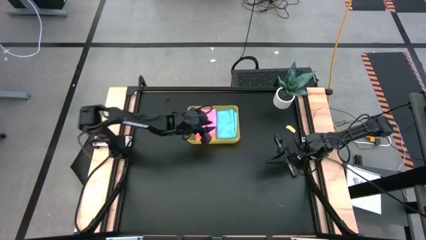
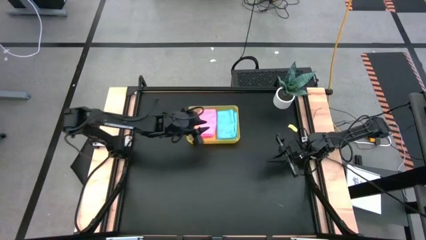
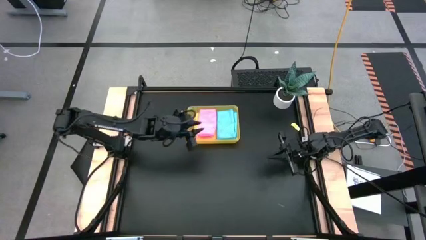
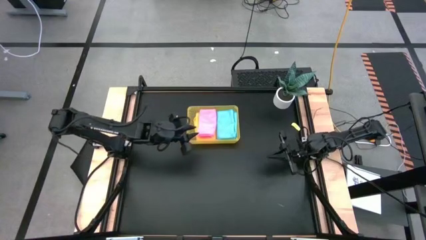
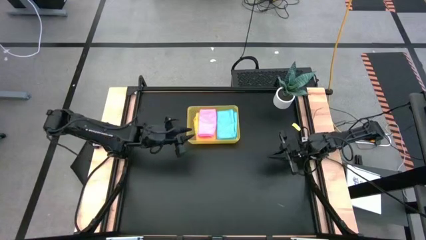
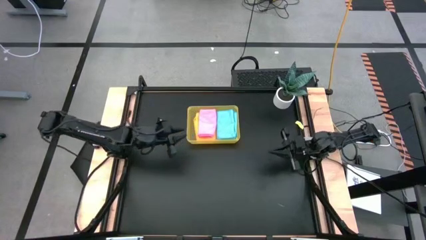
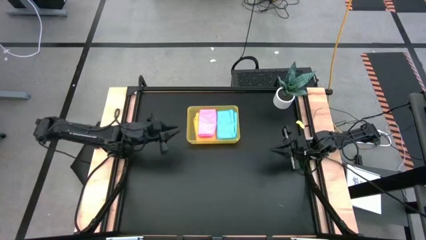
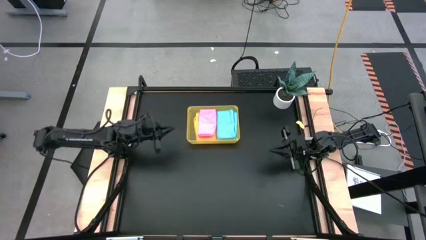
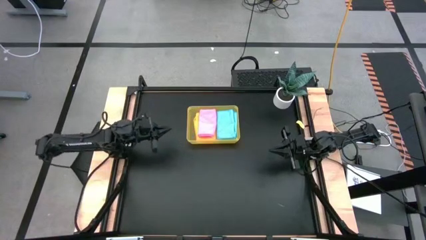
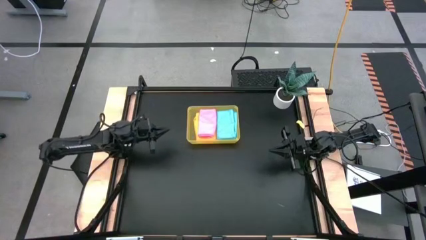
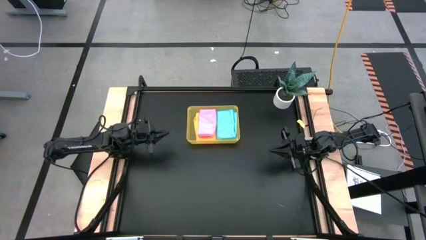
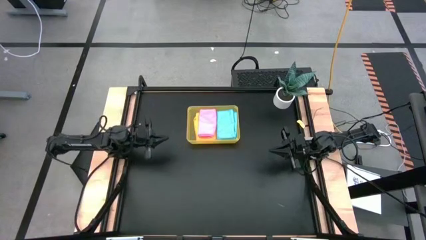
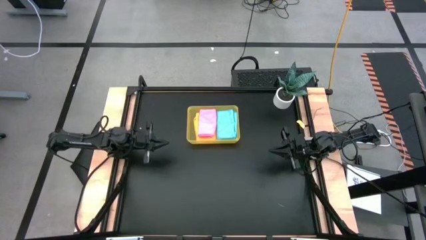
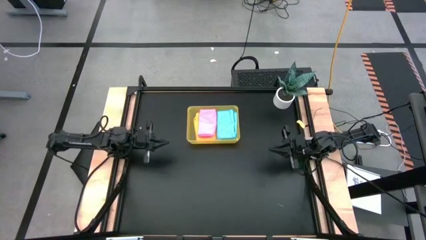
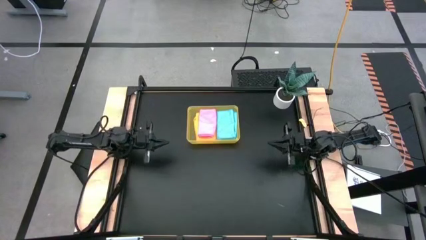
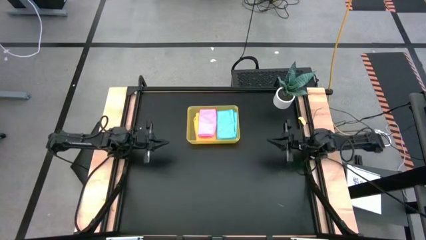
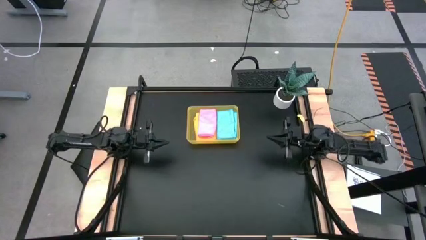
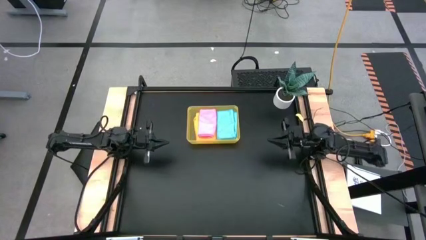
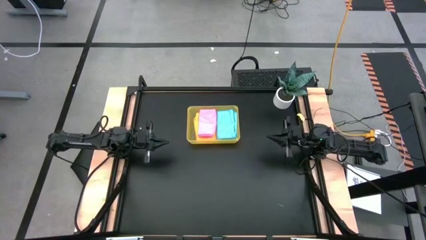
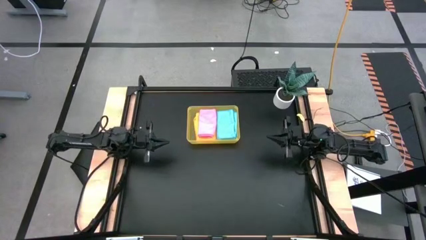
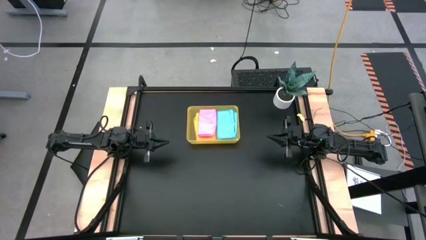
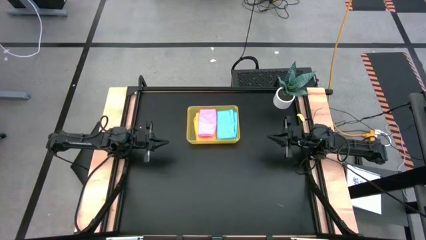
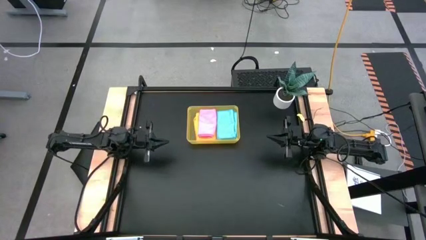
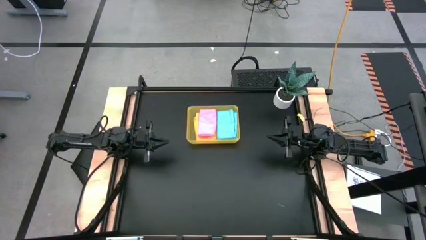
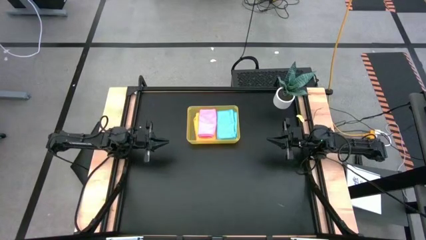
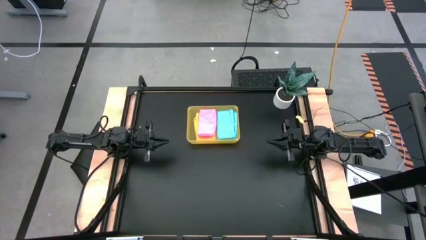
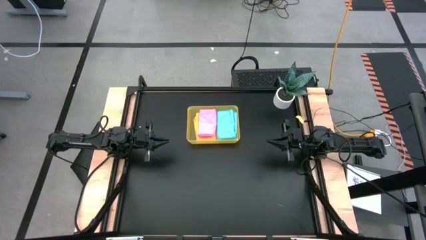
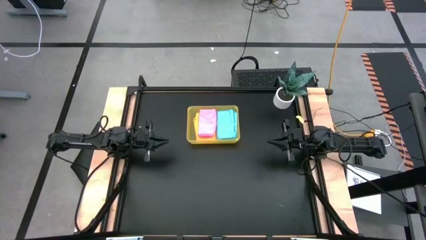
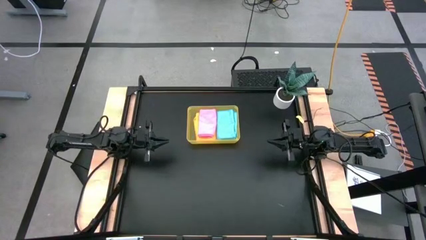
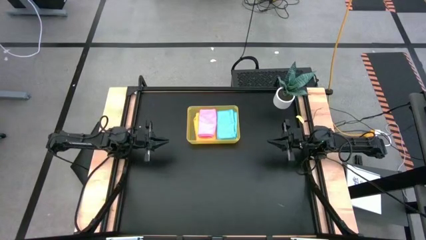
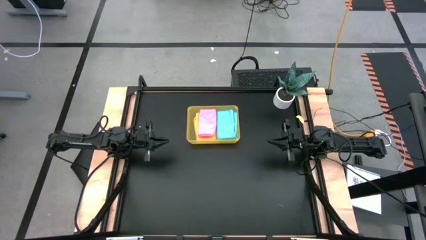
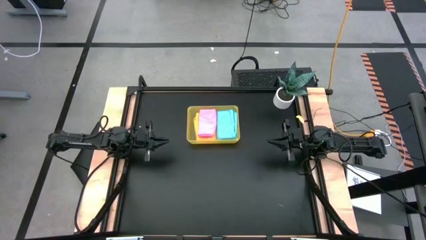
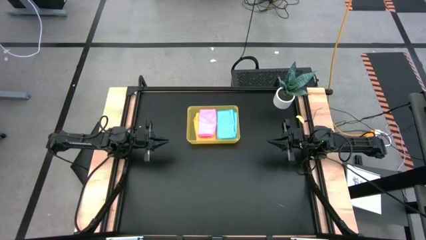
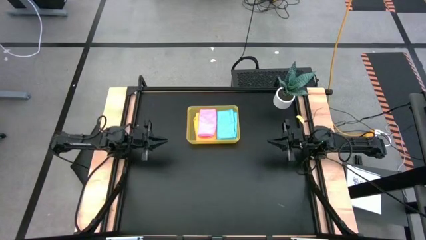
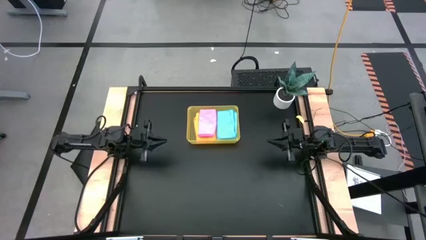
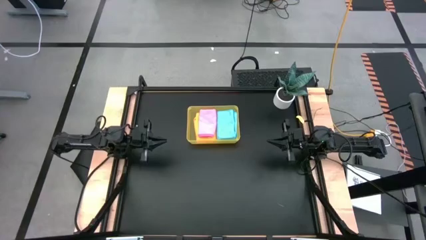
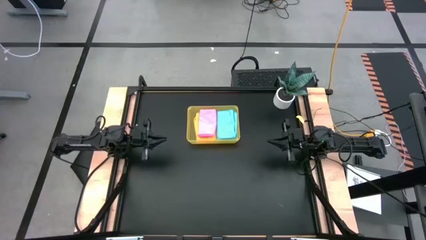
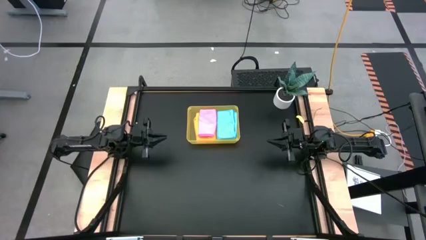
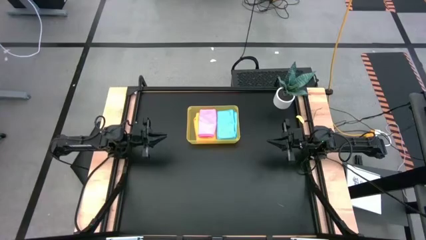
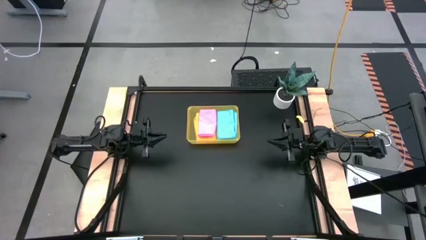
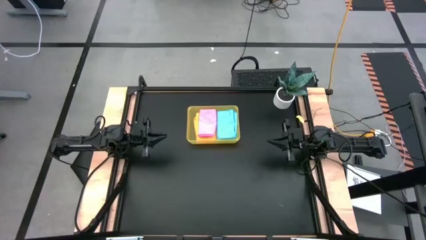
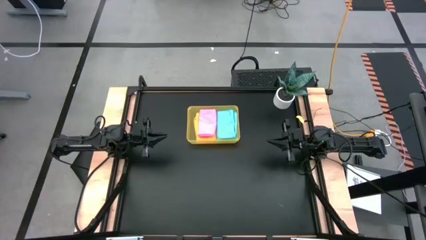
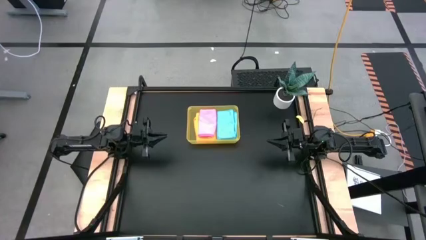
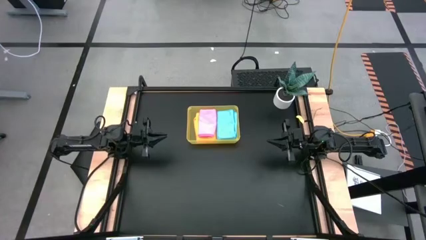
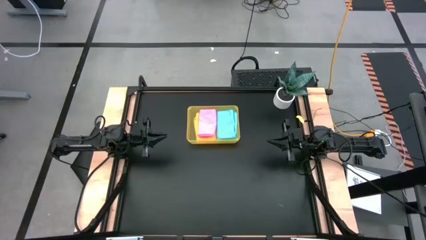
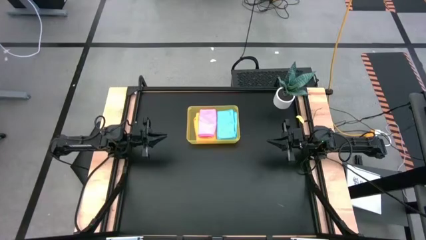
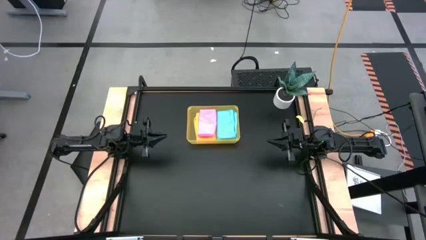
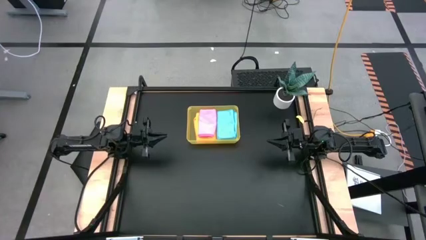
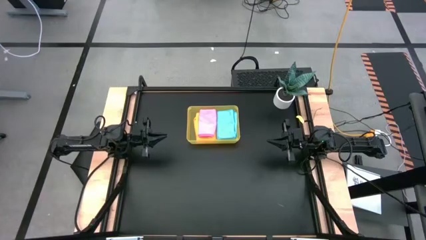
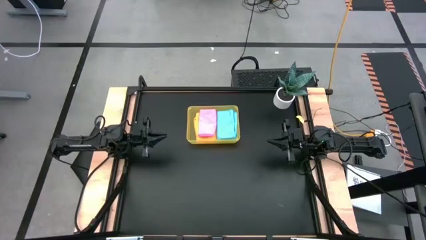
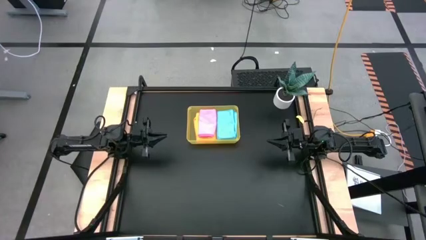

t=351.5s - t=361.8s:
Task: Fold microfiber towels
Return to Home Position
